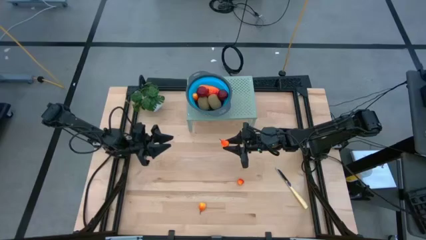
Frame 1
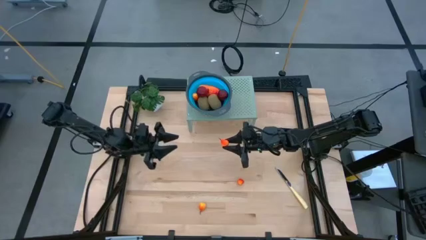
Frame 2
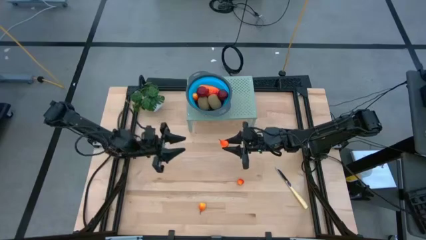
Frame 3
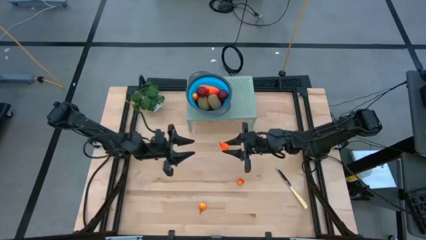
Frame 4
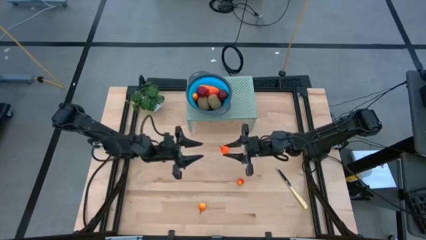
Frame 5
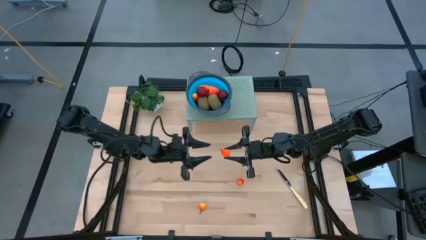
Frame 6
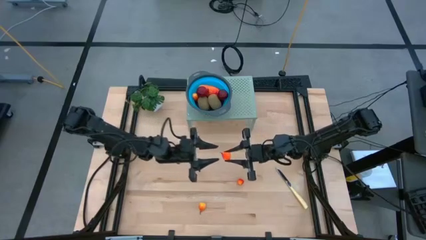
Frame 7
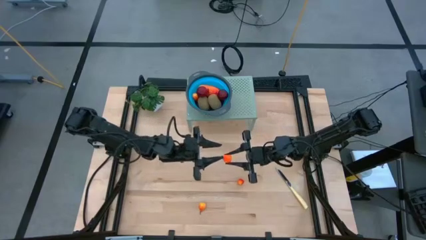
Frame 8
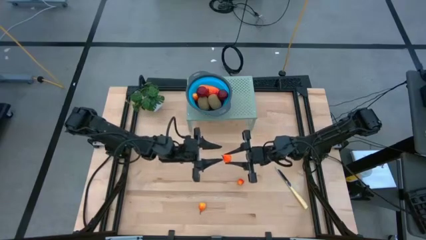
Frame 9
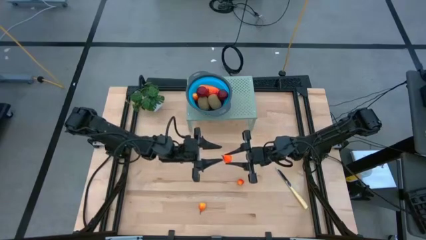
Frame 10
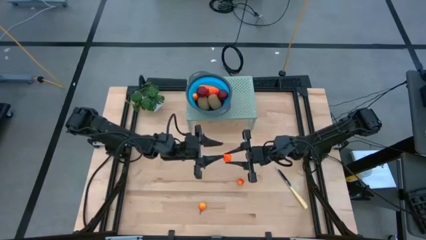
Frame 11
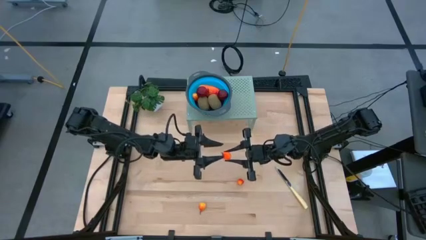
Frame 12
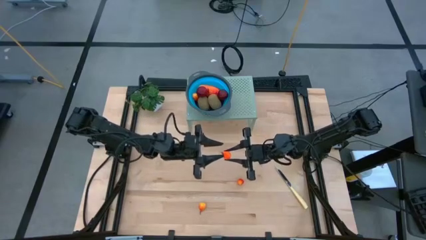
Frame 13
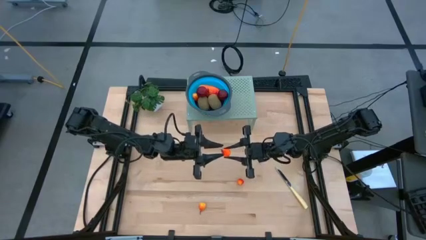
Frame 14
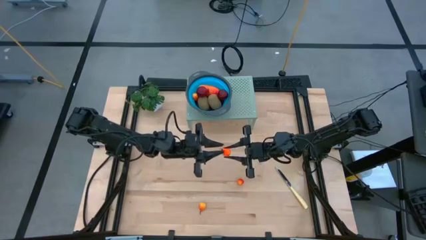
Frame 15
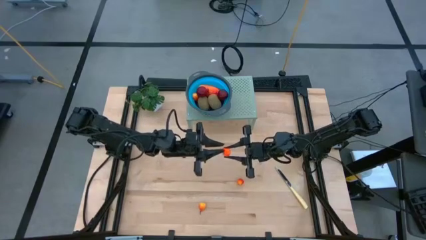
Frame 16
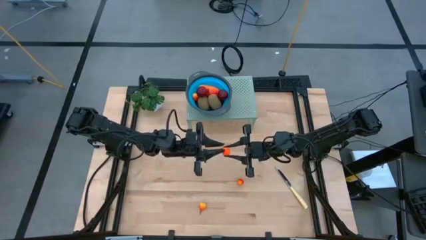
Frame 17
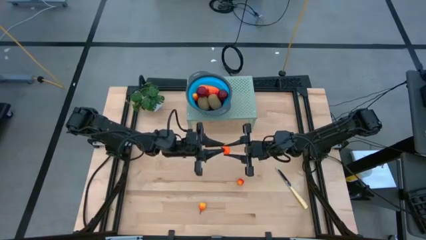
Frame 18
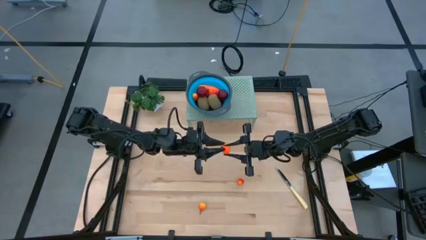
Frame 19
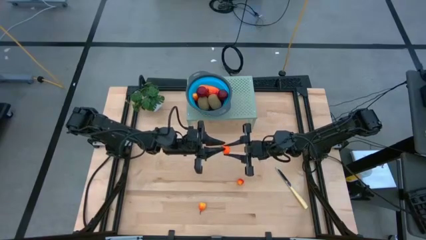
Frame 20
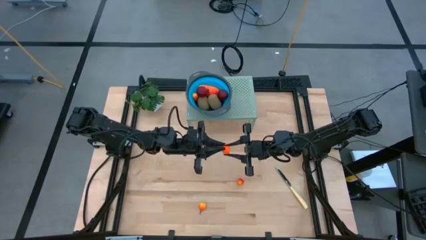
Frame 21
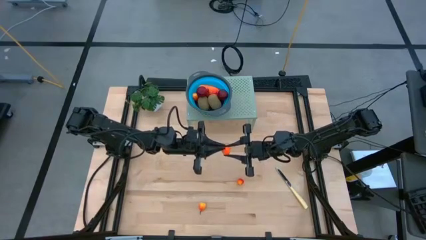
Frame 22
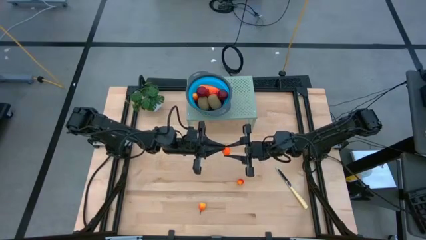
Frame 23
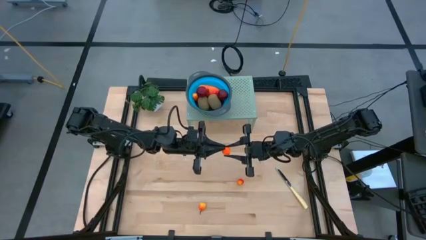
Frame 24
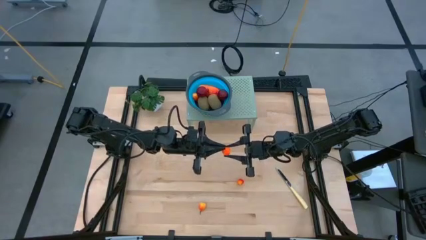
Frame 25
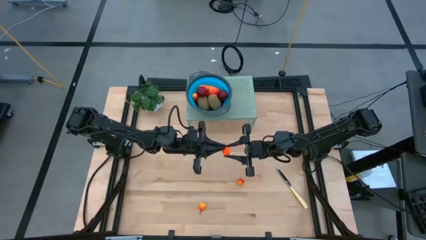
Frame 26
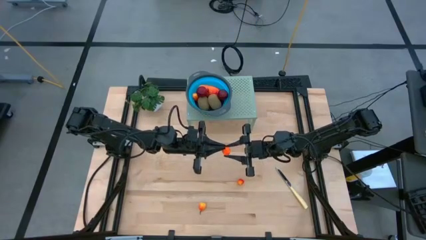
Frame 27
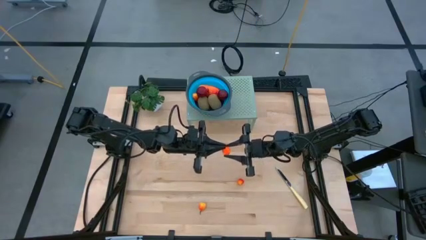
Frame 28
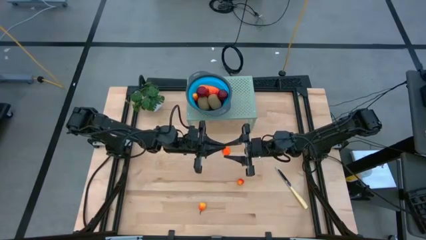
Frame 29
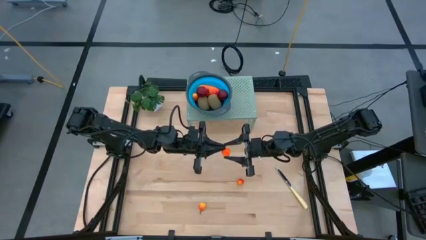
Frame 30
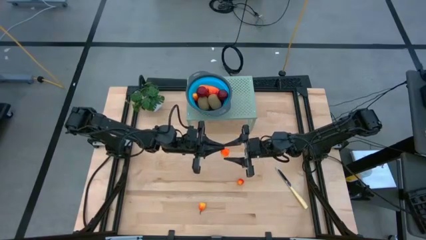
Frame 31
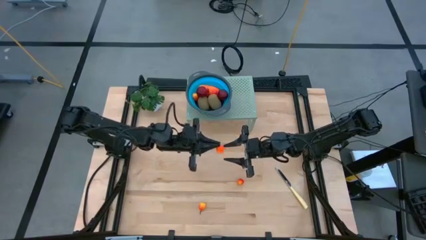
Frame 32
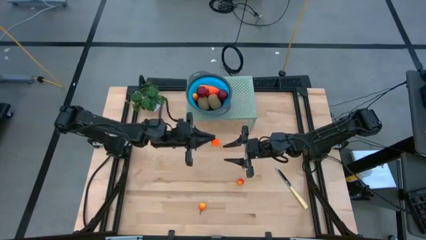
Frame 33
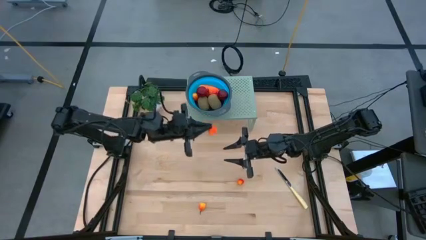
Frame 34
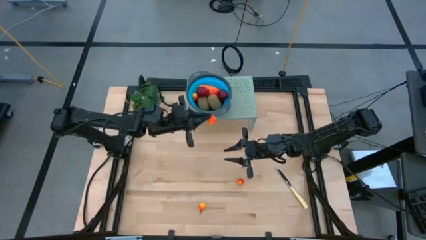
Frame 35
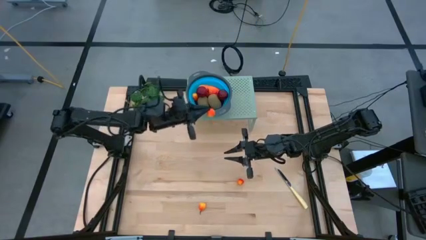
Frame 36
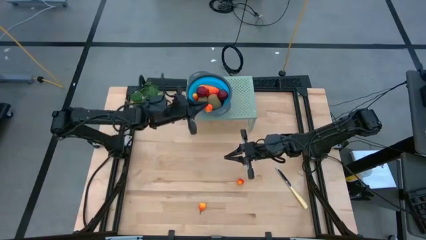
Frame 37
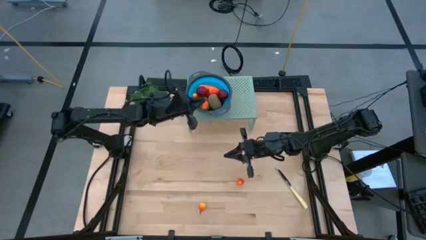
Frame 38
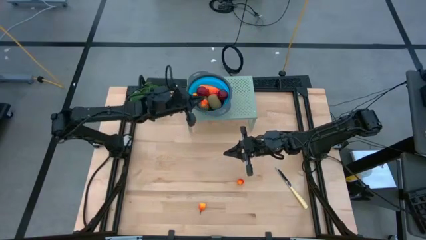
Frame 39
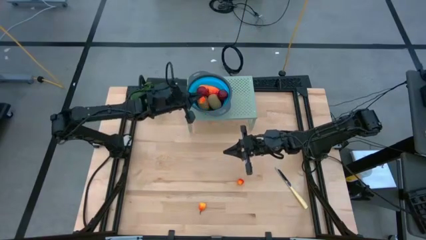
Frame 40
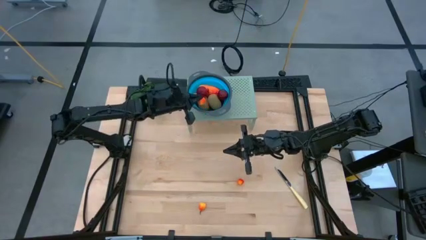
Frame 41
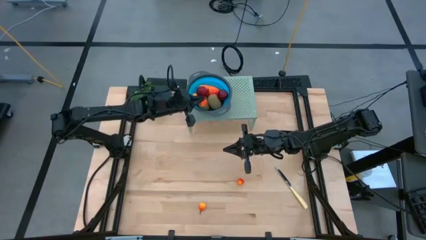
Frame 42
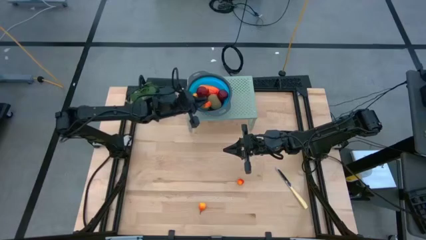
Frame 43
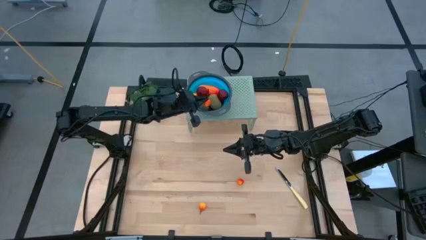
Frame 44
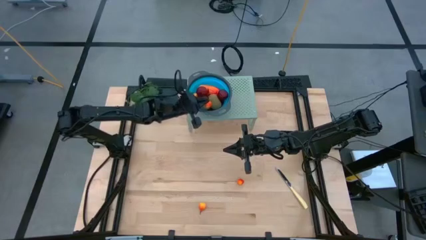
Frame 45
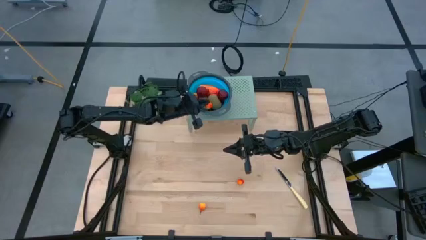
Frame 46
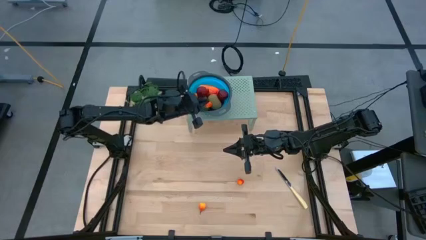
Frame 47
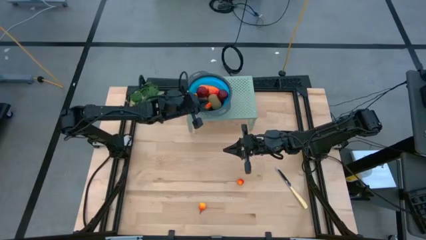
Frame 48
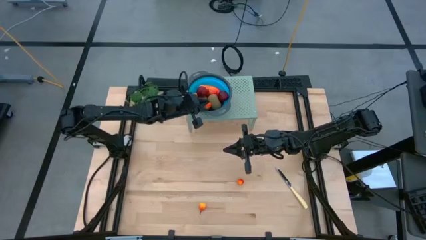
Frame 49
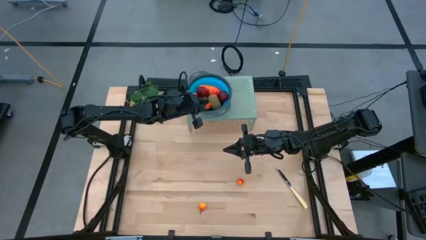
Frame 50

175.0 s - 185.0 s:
Task: Pick & Place Fruit
Put the orange pear into the blue bowl on the shelf

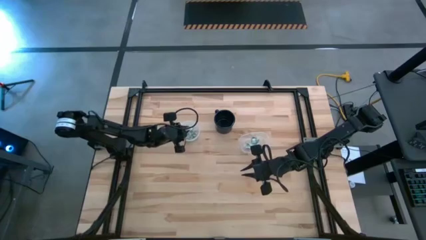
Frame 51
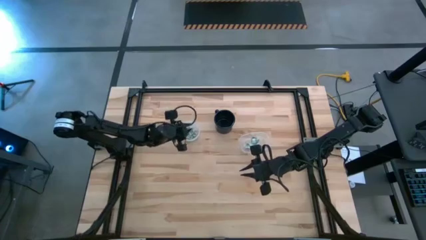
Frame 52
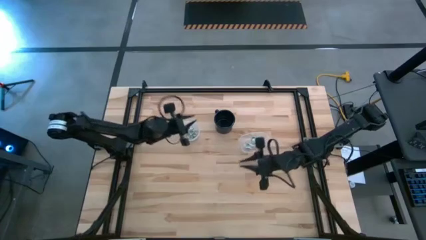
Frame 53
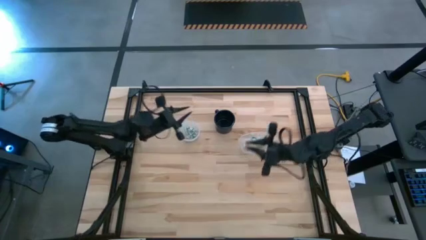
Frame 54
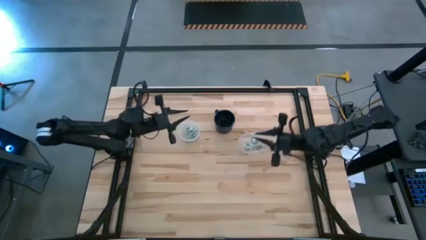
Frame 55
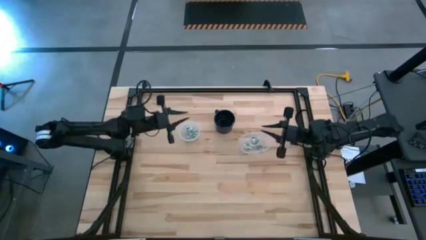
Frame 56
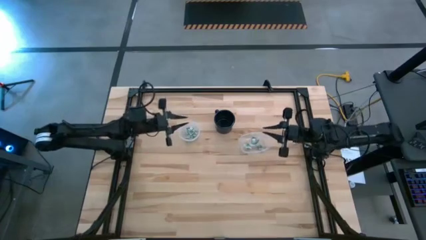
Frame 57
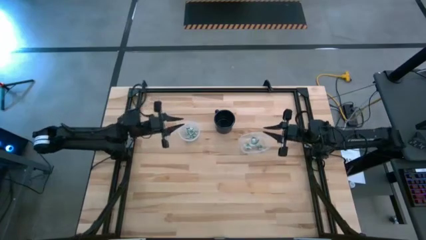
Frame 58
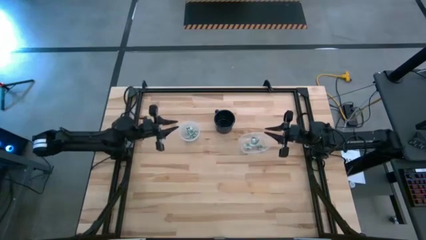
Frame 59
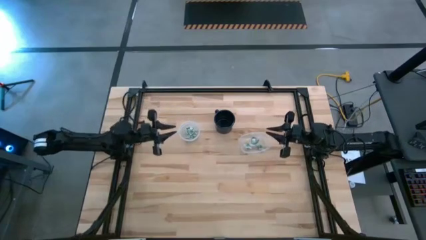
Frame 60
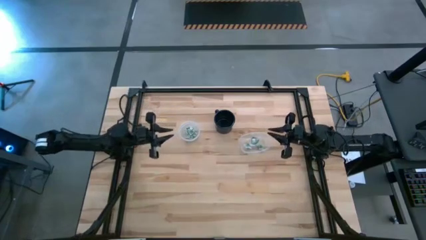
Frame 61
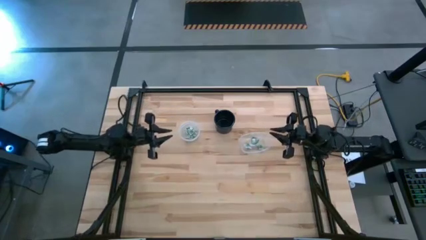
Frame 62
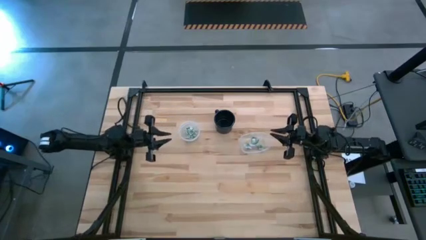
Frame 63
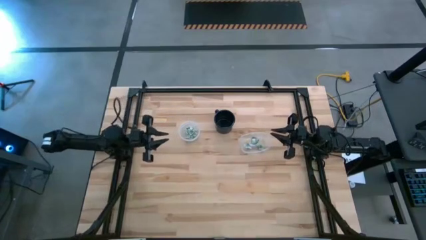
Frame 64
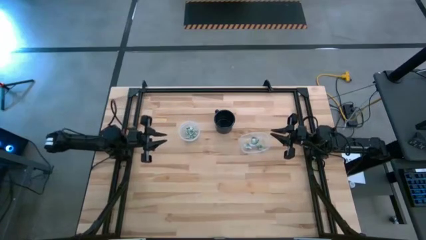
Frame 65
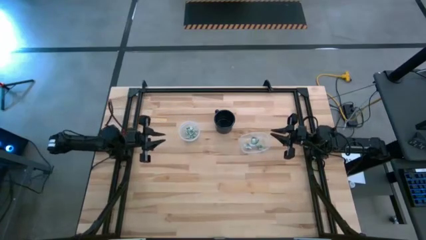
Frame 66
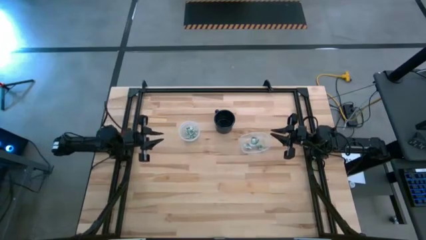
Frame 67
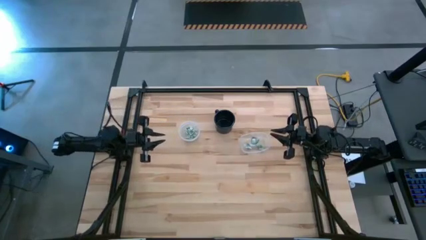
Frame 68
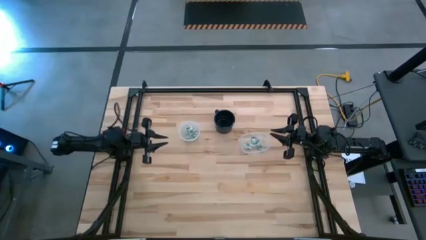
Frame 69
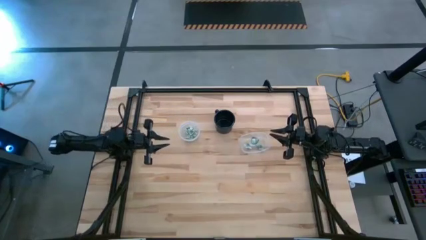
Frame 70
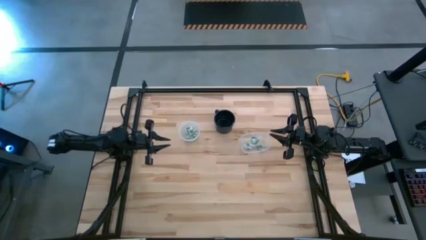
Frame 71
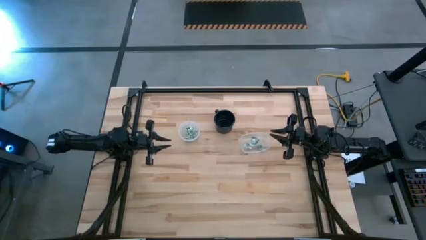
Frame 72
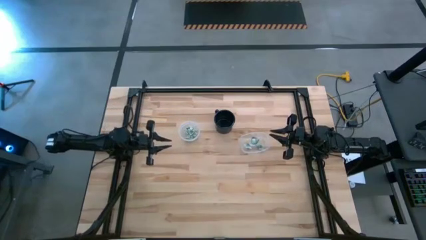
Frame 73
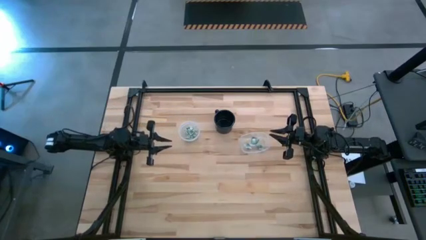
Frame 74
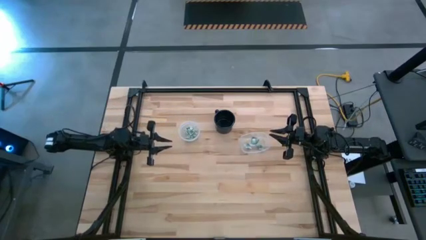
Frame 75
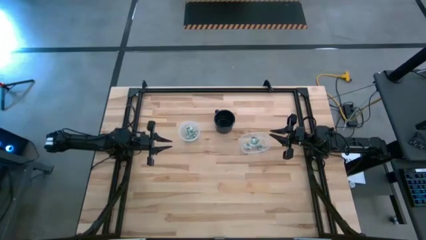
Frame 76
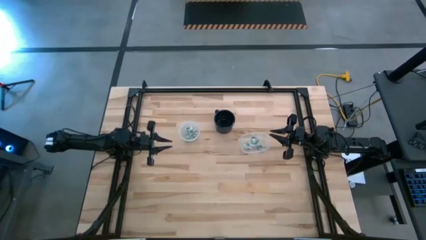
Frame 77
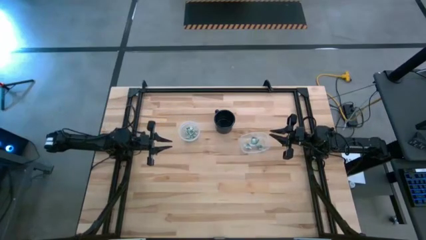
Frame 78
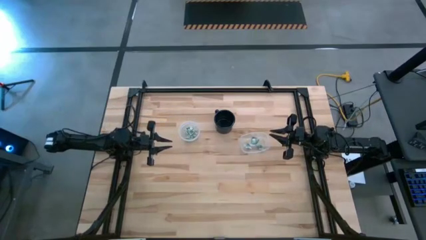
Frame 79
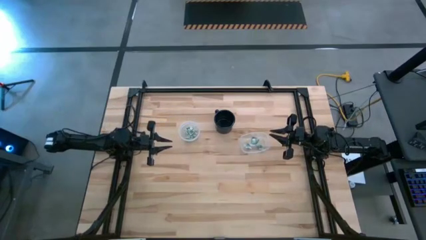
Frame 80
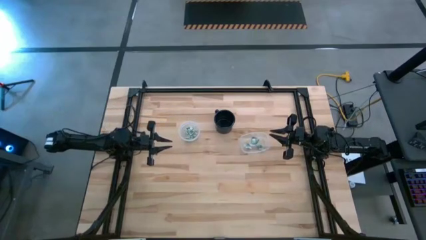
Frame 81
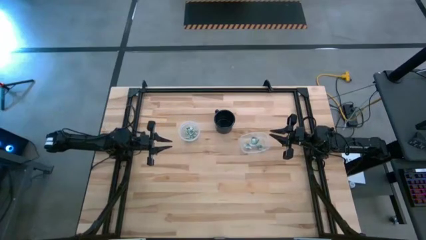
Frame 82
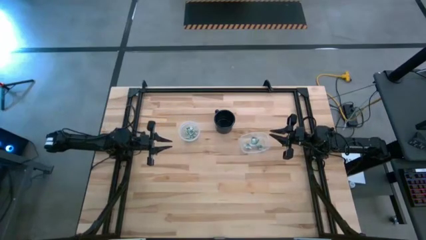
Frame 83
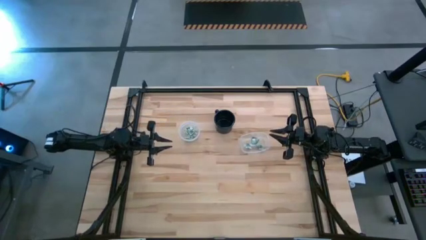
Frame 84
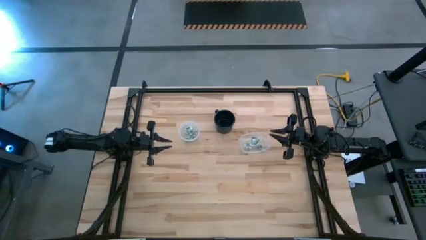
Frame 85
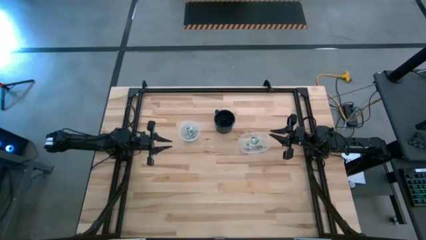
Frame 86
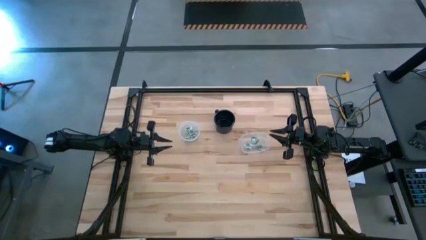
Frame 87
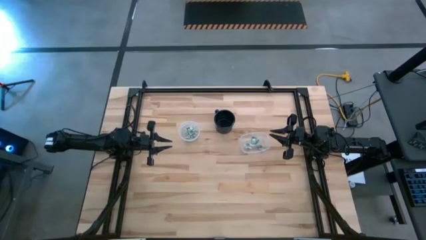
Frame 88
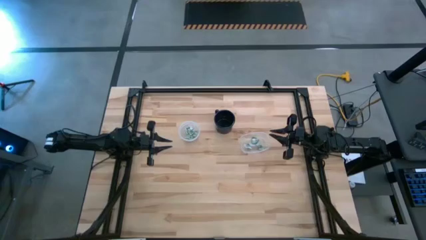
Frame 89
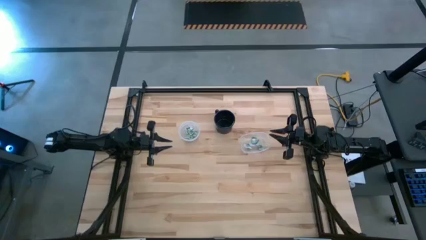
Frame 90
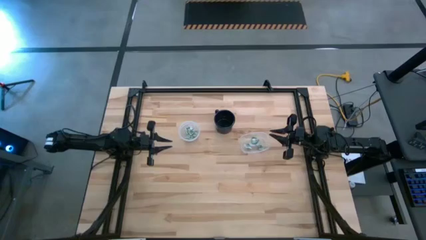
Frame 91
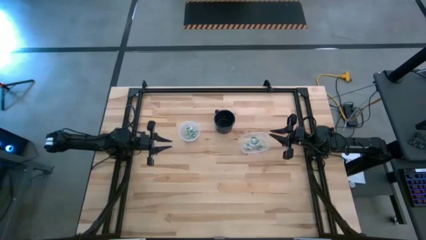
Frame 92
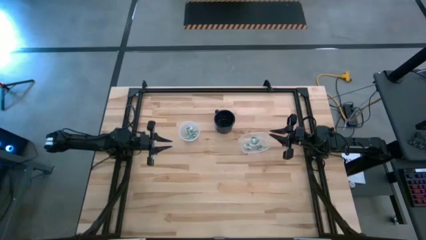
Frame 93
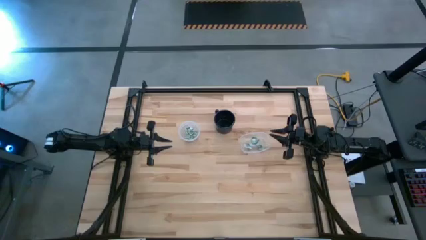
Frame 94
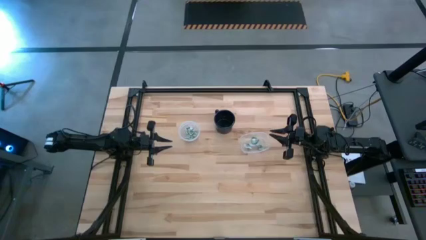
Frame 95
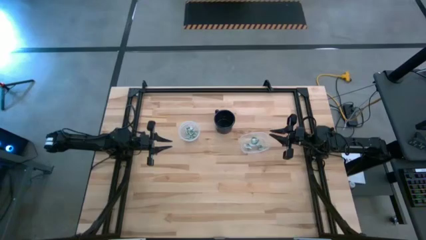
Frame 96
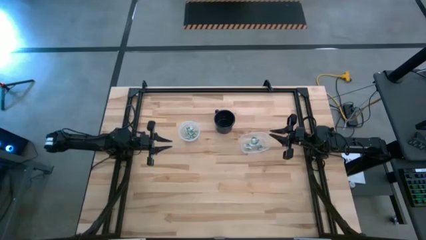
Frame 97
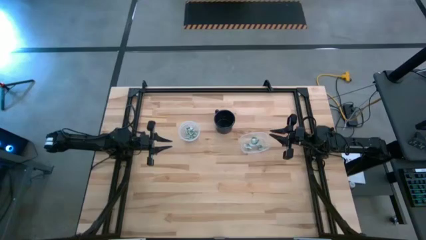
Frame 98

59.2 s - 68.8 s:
Task: Pick and place items into bin
Return to Home Position
